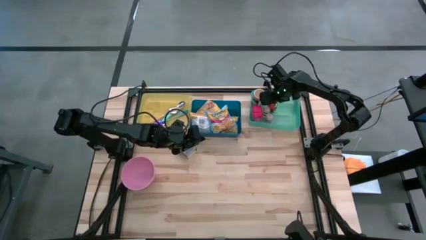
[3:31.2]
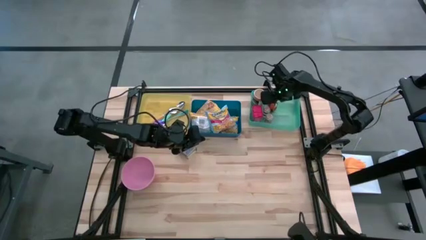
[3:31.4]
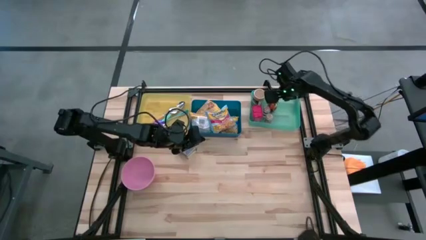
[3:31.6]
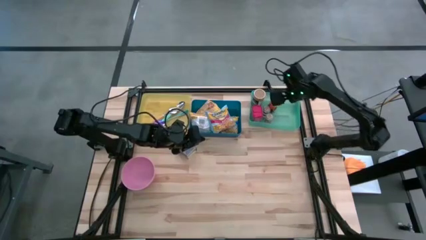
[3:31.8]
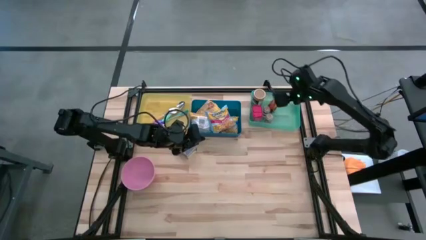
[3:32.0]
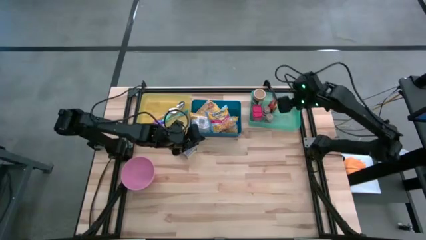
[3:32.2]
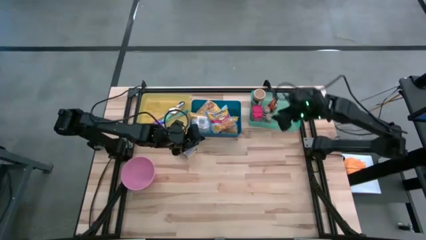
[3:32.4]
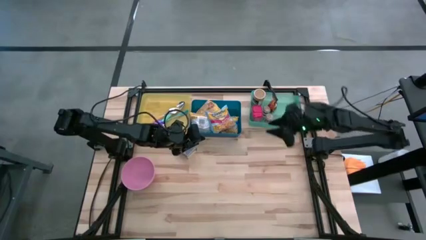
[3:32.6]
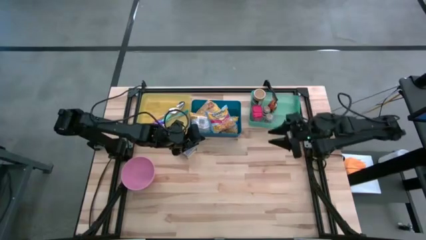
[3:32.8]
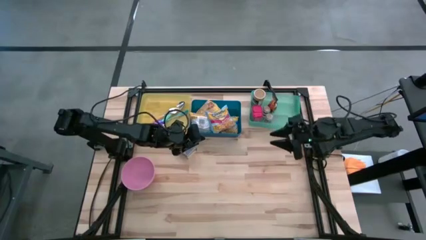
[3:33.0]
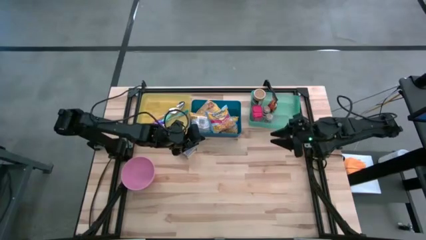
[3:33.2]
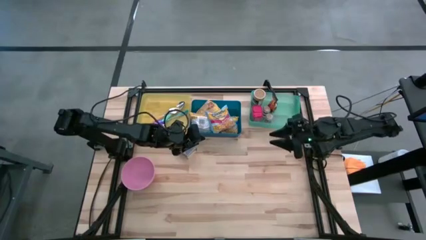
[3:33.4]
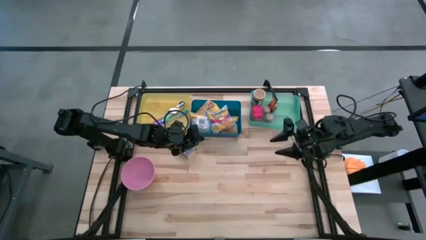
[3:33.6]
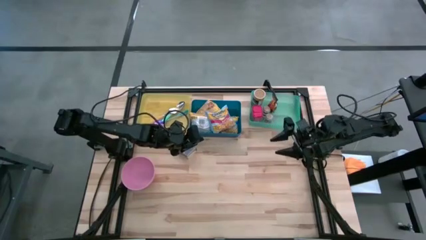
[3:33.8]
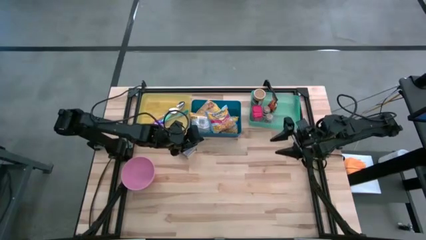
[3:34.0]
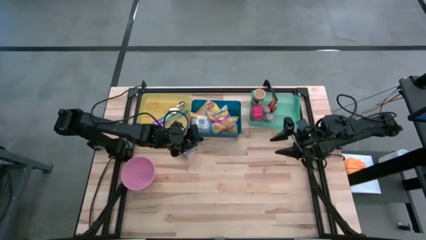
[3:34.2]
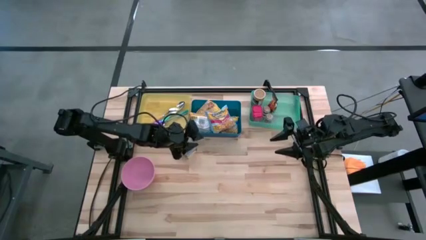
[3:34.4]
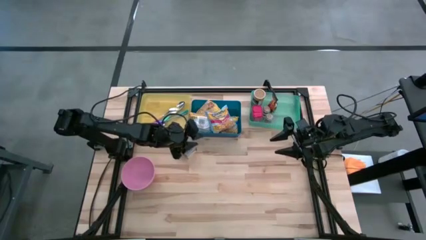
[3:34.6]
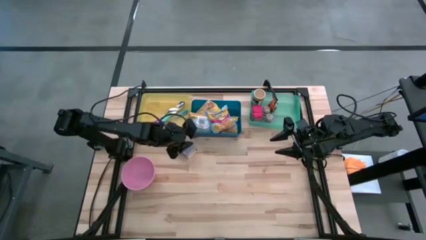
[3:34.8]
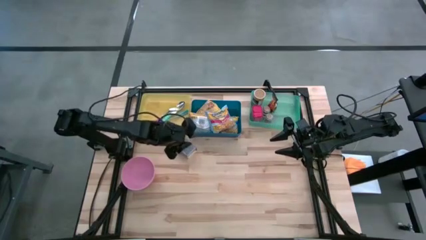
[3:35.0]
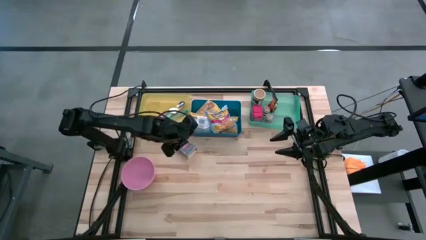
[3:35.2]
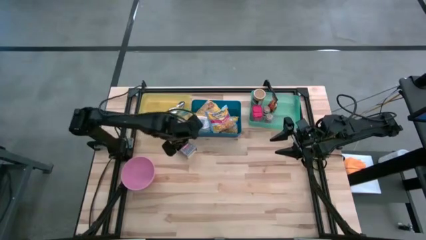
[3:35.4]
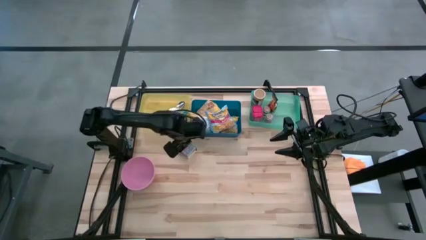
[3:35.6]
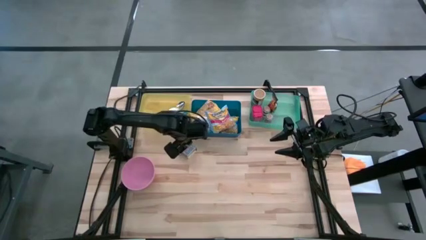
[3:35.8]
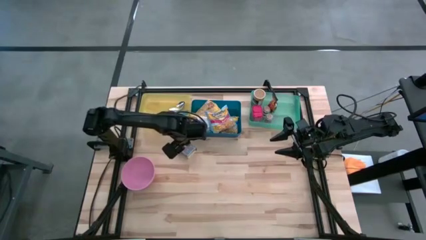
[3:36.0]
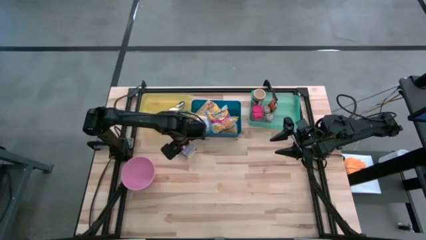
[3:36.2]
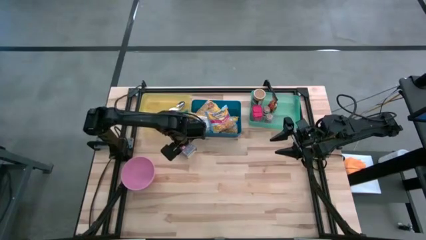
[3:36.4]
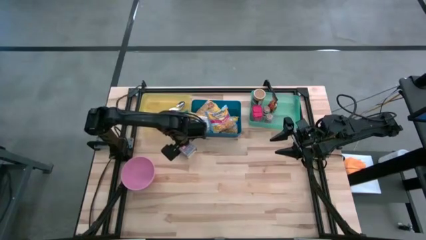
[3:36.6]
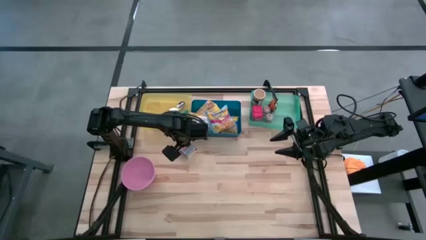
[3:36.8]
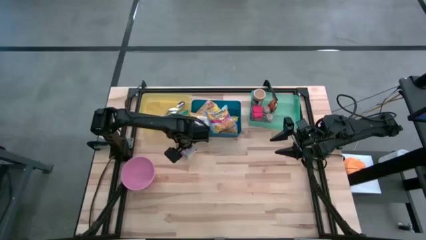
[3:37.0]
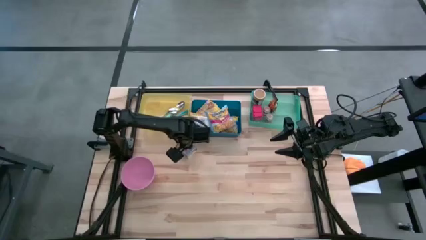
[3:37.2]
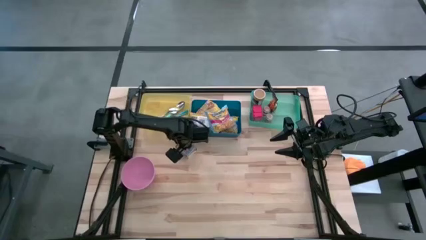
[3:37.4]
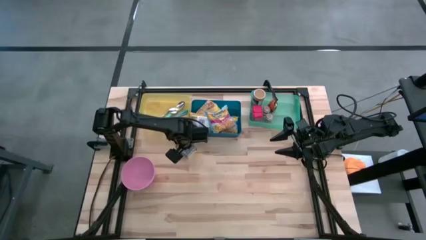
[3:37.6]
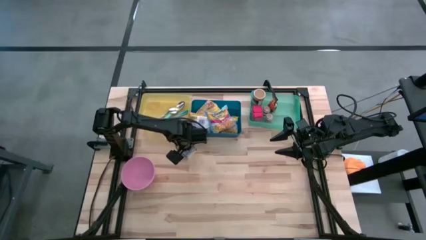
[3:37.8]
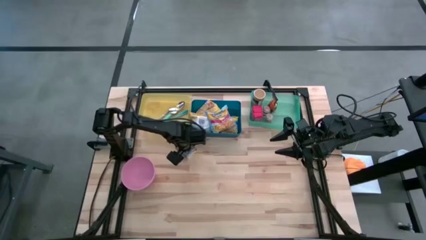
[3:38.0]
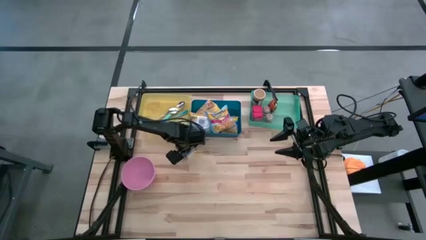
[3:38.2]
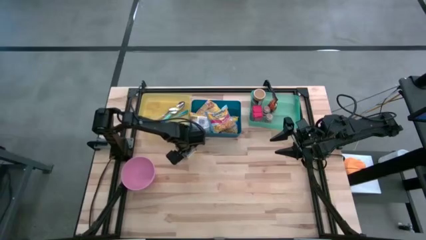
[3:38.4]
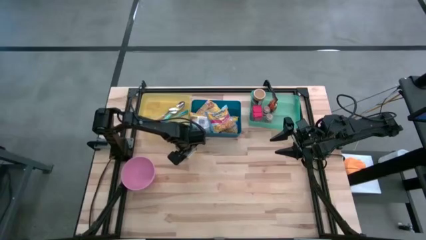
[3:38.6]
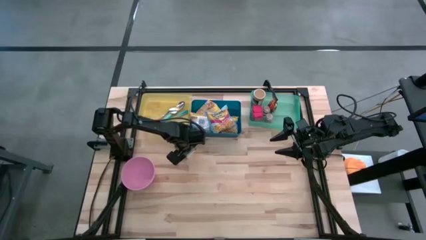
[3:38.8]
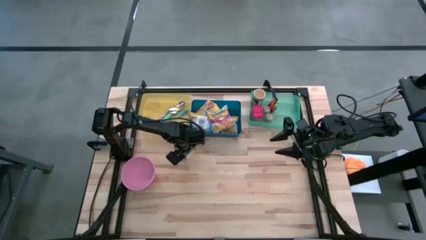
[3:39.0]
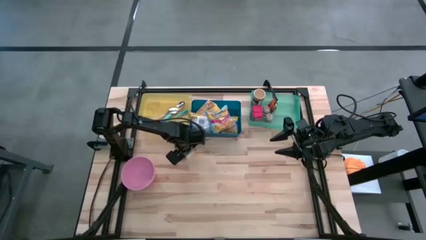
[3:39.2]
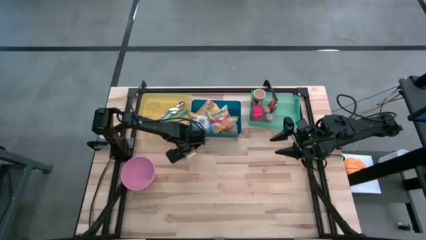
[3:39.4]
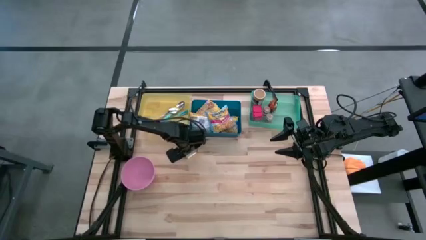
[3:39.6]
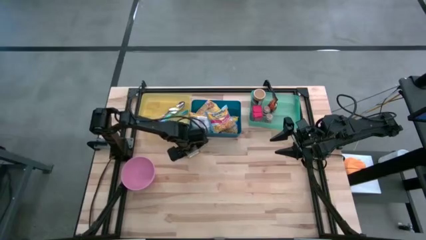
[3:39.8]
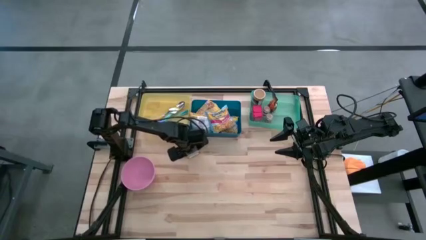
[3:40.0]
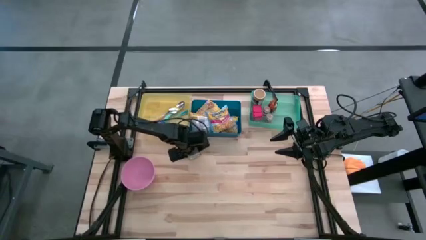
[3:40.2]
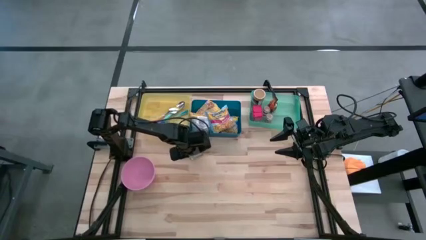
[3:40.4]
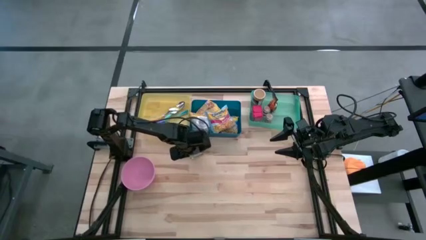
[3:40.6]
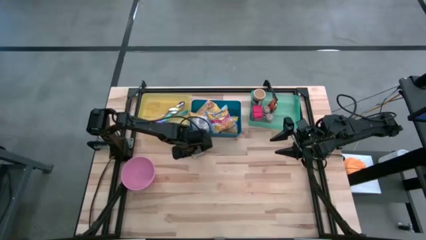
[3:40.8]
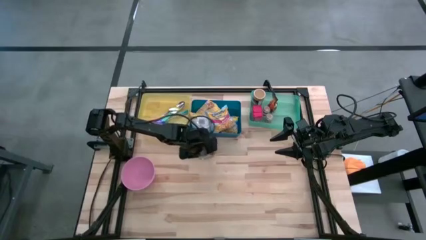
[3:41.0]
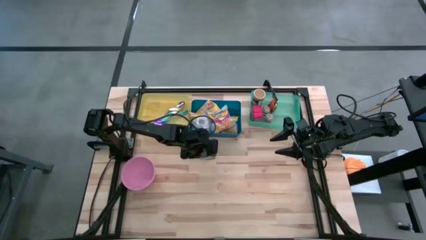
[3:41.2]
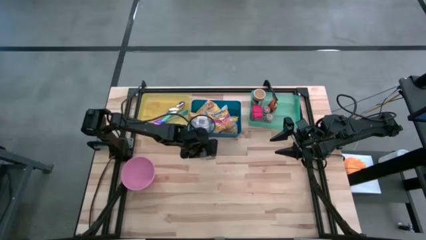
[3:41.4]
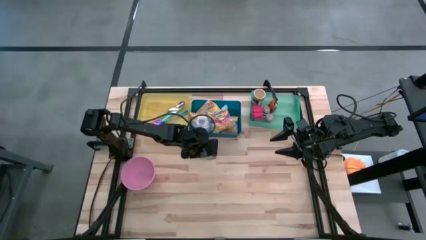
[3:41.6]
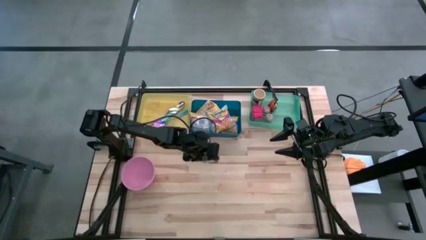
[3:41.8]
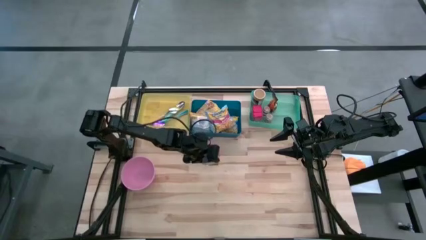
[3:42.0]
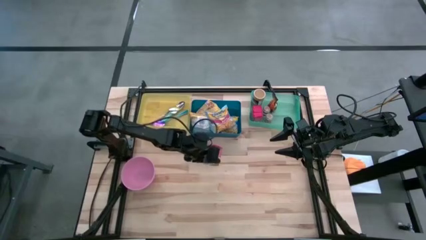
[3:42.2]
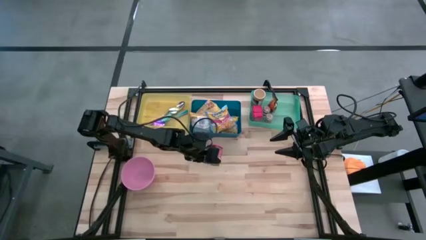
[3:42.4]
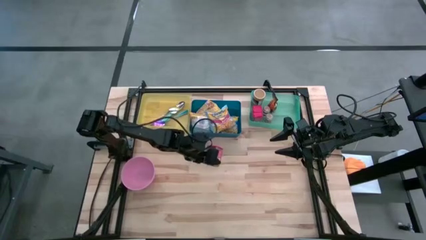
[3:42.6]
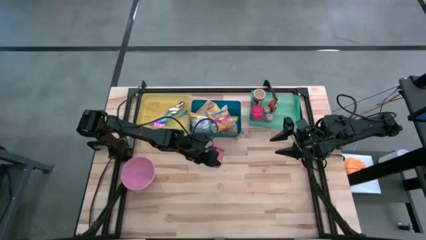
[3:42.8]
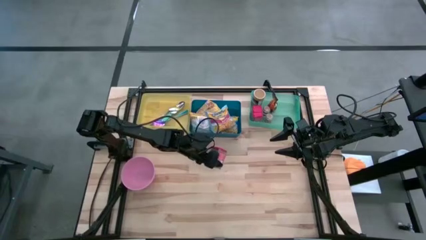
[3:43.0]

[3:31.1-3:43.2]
Put the red seasoning can into the light green bin

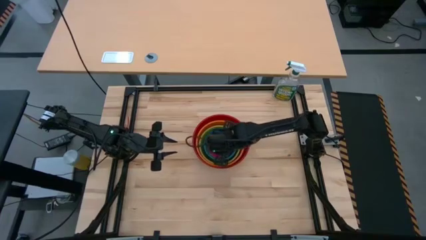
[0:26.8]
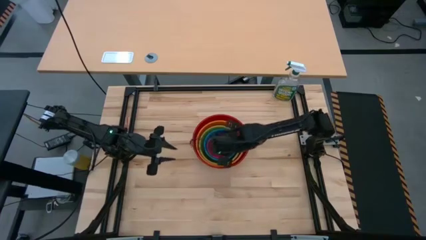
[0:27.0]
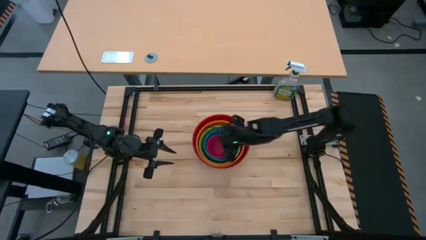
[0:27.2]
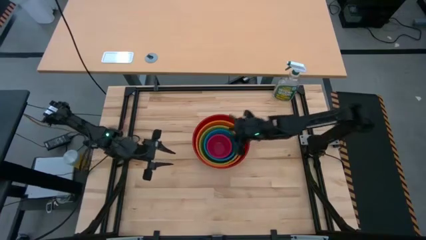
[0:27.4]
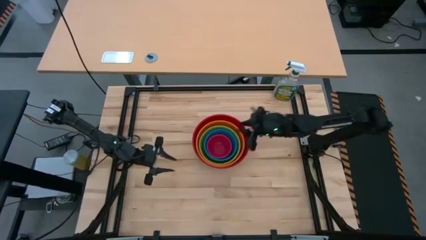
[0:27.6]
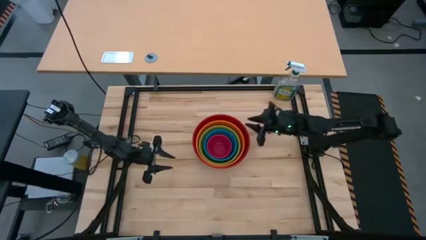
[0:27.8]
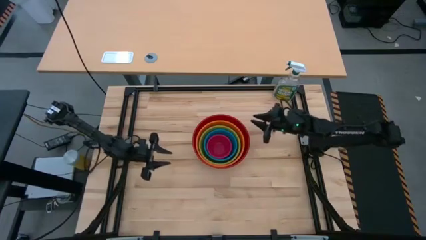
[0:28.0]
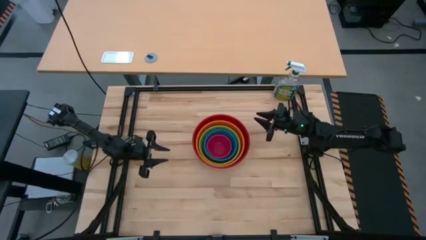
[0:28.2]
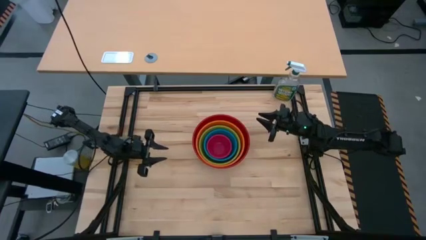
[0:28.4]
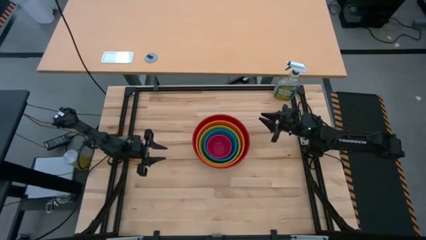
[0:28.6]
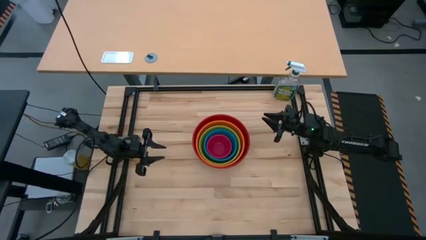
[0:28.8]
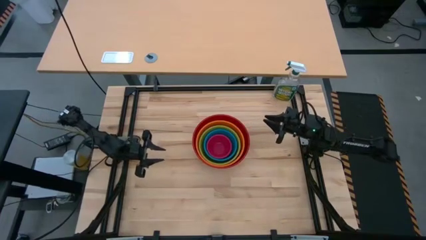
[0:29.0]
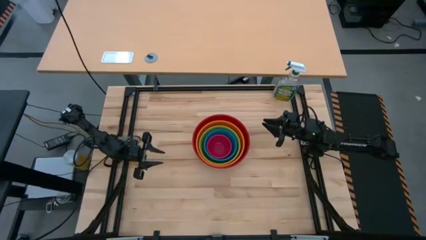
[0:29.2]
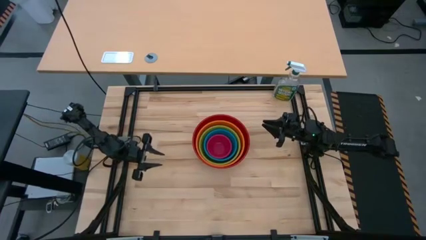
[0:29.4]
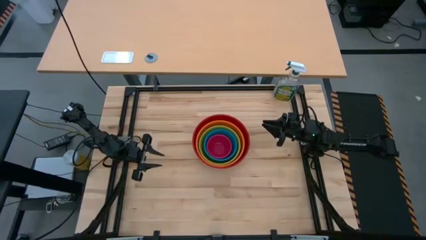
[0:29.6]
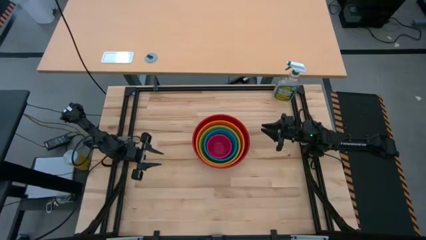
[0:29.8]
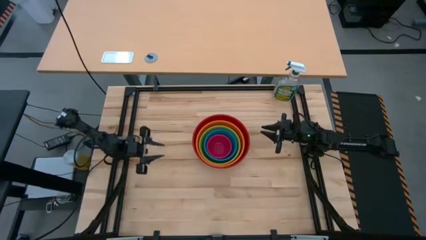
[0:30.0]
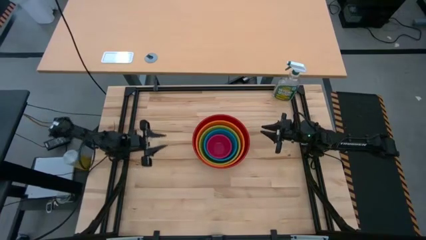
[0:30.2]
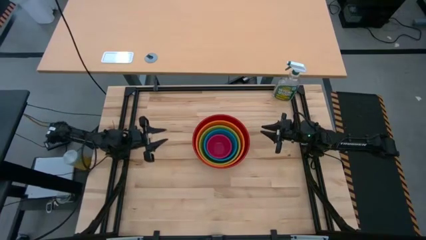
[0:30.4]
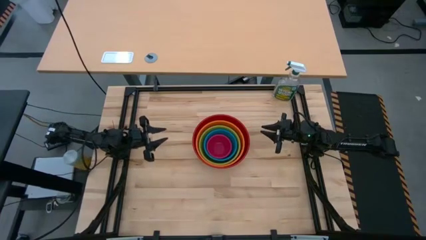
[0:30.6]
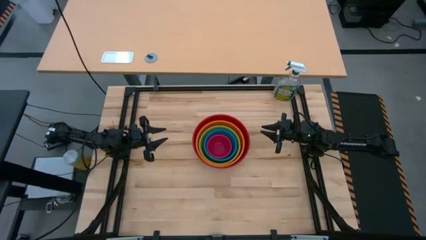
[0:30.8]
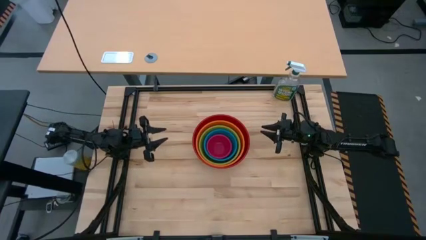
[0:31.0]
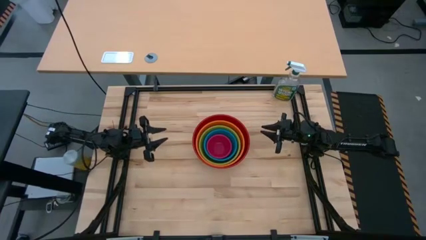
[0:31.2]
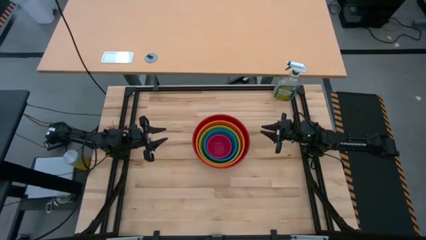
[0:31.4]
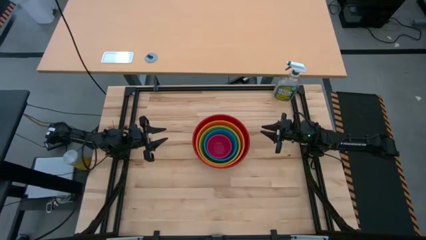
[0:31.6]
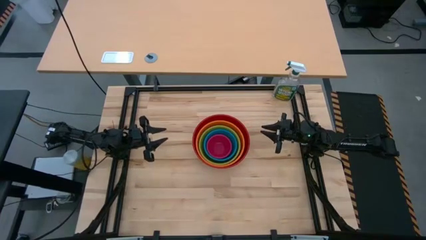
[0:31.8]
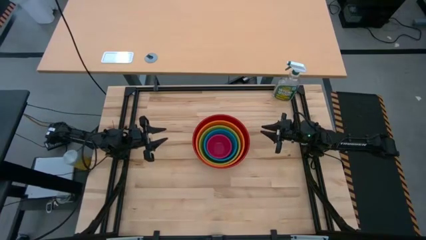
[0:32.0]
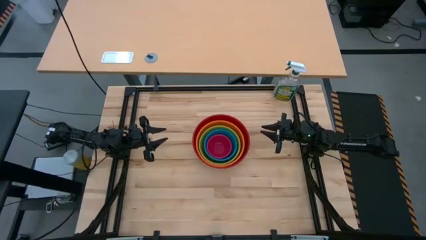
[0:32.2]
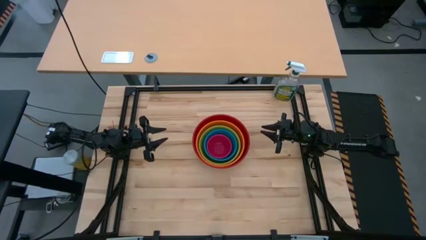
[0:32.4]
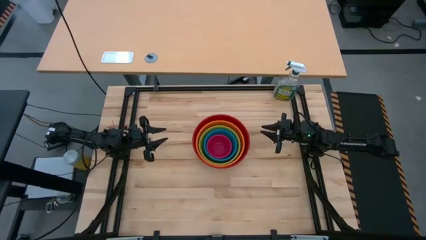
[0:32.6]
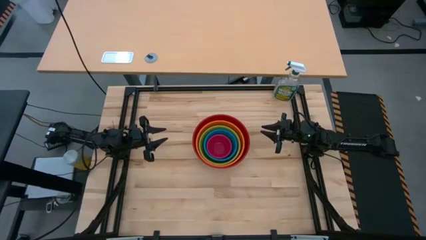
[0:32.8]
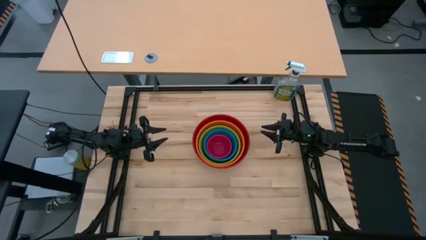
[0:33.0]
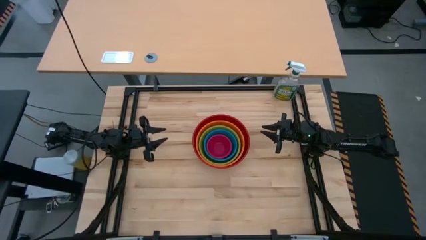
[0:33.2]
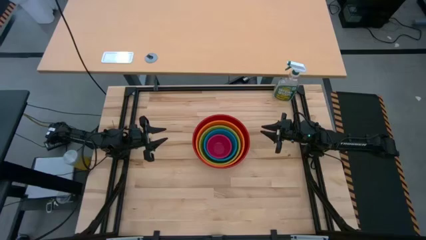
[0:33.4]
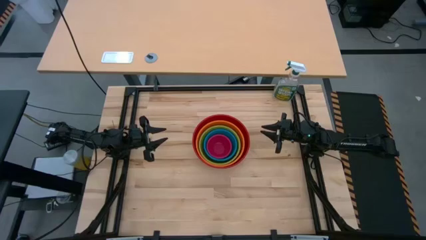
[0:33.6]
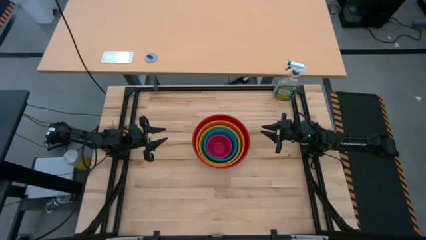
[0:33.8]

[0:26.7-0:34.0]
Return to Home Position
